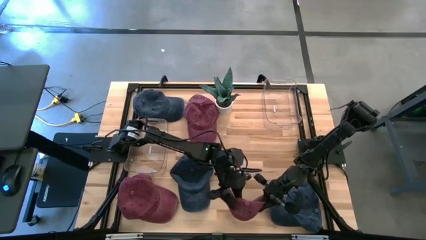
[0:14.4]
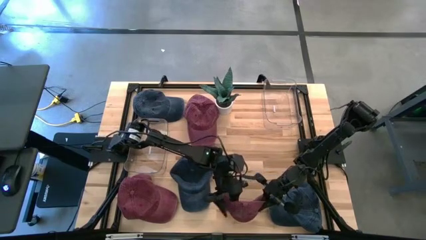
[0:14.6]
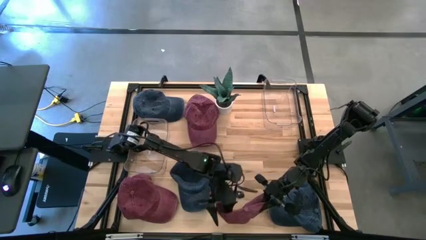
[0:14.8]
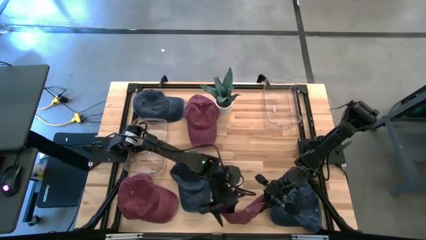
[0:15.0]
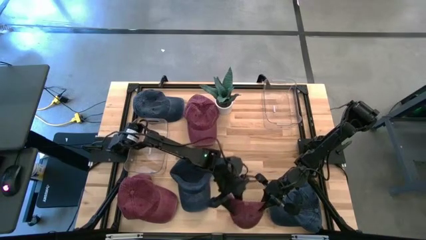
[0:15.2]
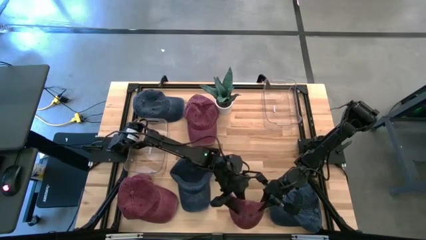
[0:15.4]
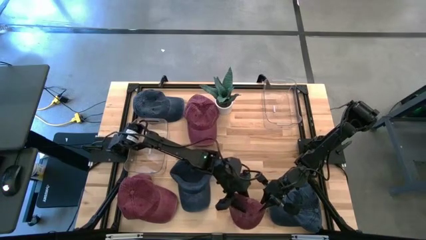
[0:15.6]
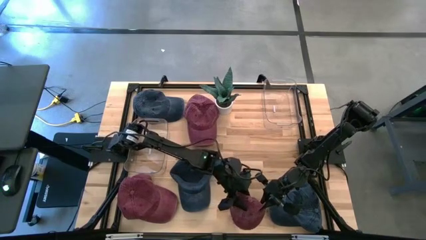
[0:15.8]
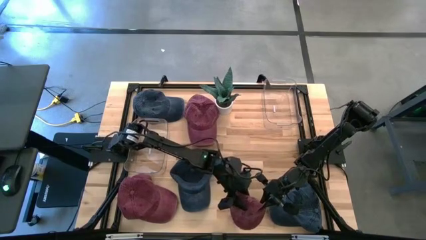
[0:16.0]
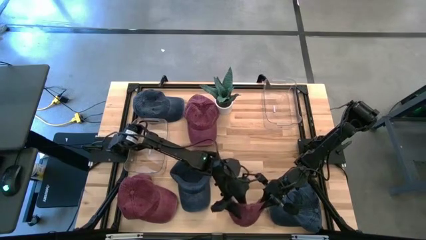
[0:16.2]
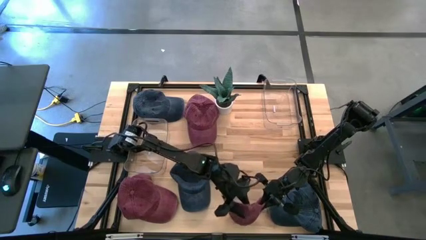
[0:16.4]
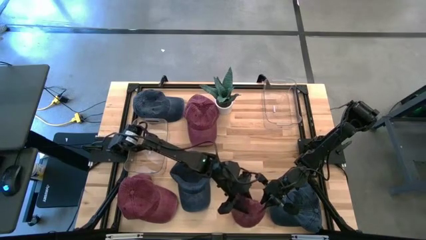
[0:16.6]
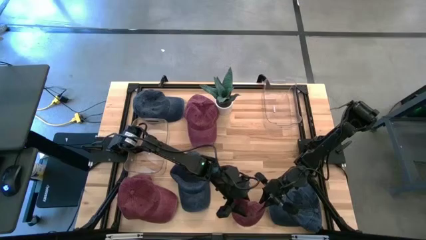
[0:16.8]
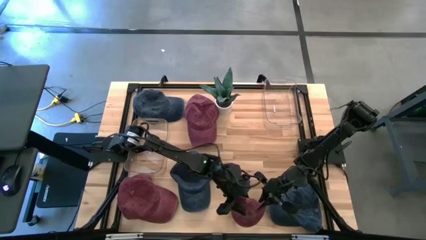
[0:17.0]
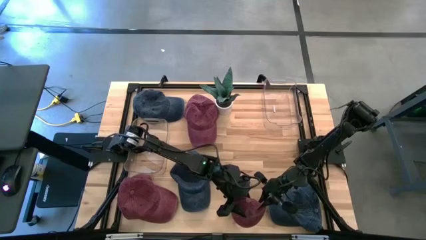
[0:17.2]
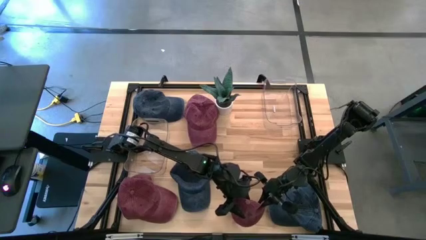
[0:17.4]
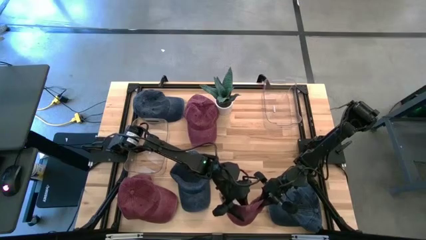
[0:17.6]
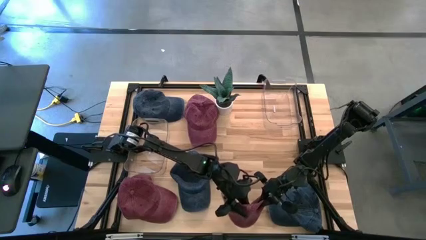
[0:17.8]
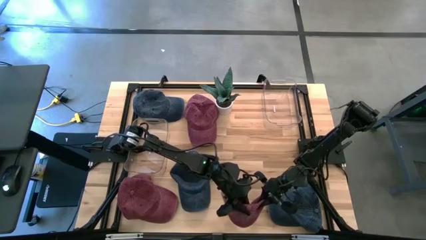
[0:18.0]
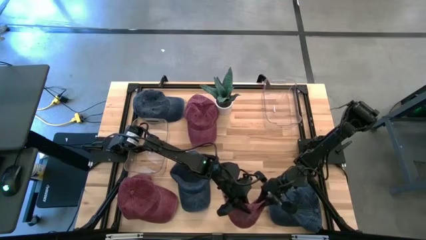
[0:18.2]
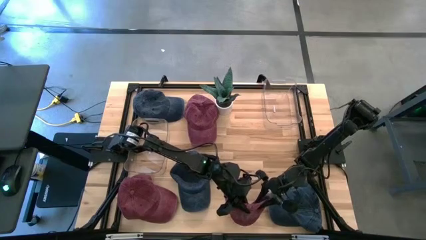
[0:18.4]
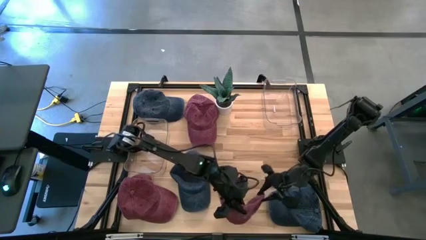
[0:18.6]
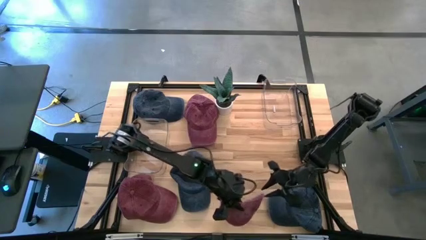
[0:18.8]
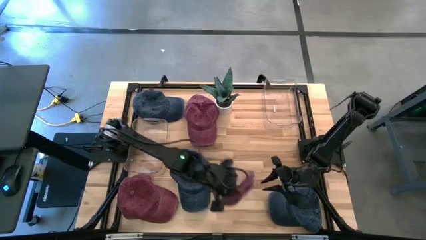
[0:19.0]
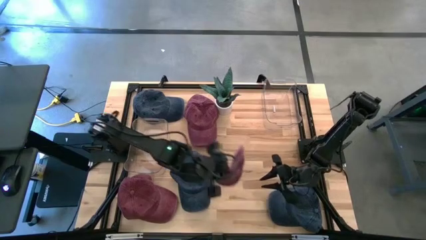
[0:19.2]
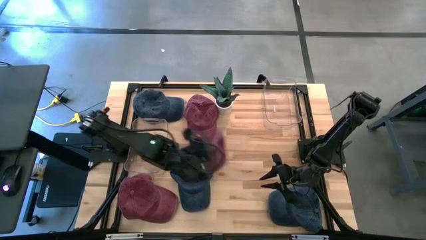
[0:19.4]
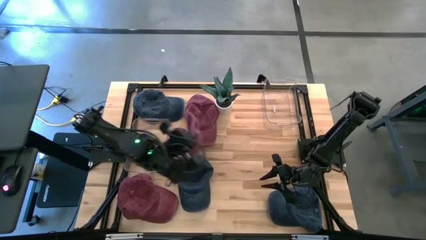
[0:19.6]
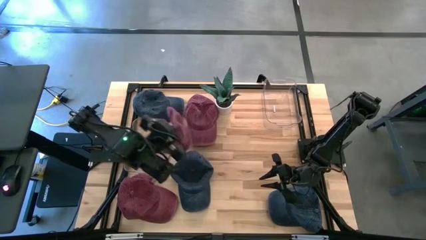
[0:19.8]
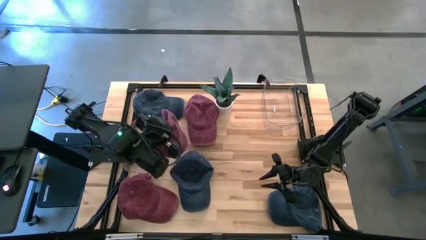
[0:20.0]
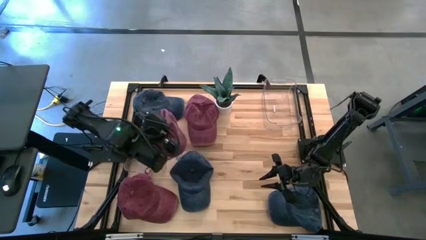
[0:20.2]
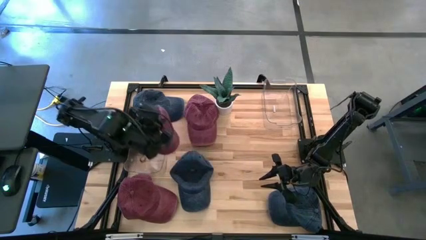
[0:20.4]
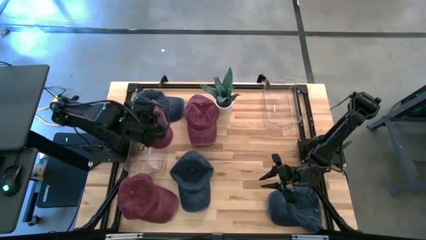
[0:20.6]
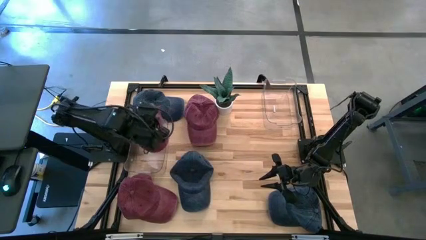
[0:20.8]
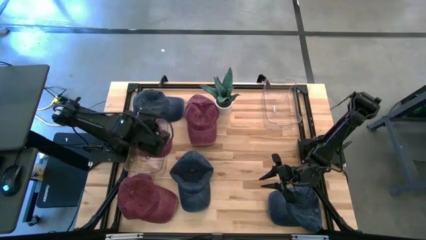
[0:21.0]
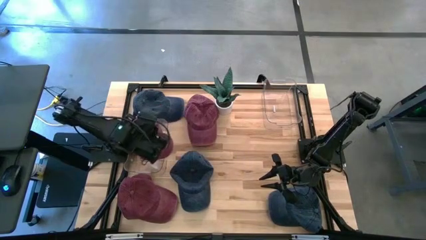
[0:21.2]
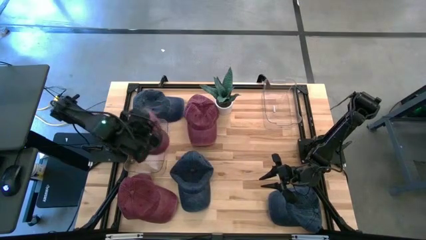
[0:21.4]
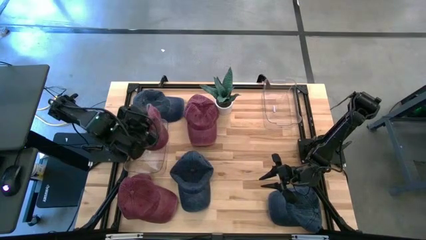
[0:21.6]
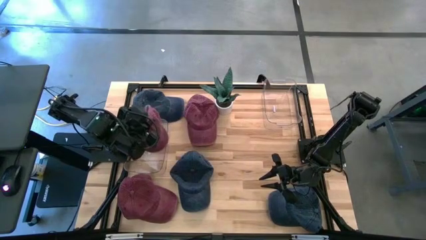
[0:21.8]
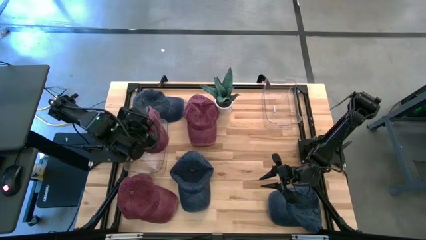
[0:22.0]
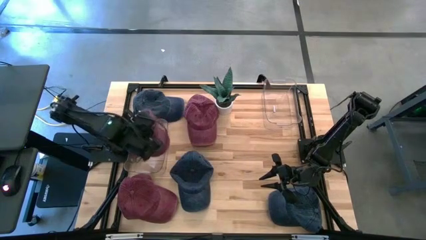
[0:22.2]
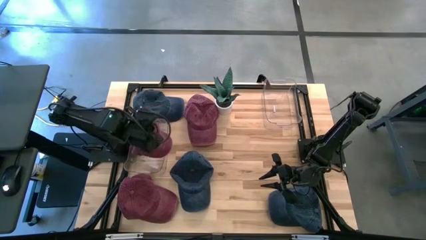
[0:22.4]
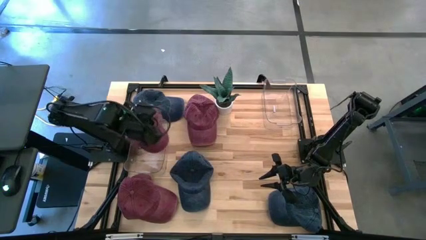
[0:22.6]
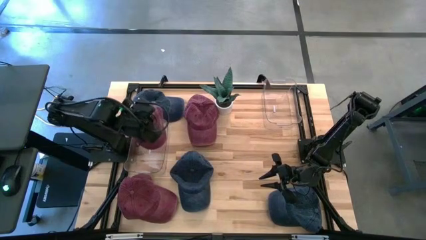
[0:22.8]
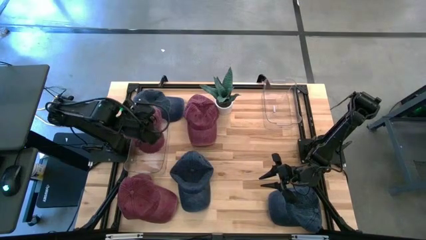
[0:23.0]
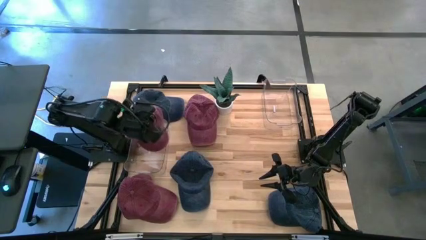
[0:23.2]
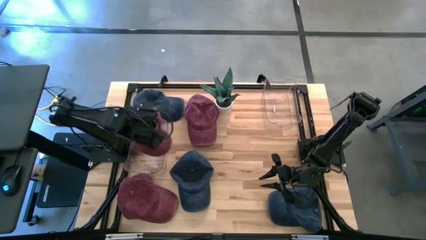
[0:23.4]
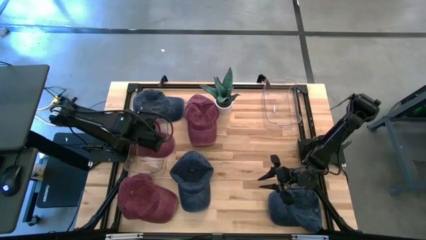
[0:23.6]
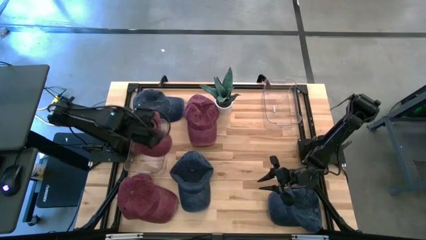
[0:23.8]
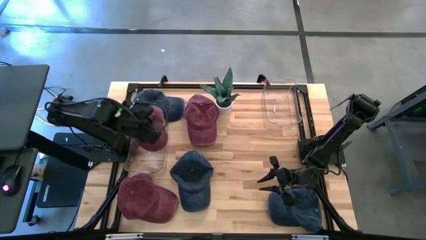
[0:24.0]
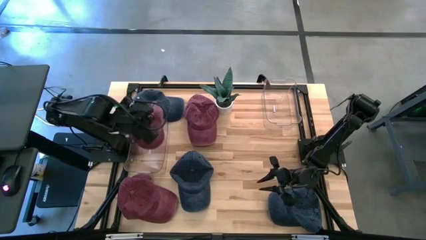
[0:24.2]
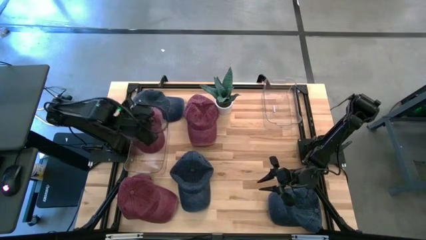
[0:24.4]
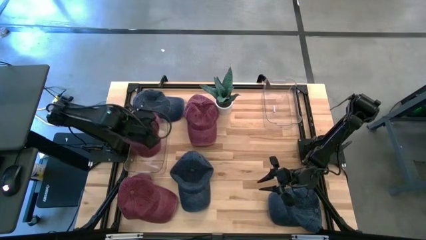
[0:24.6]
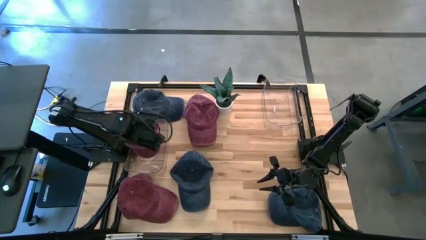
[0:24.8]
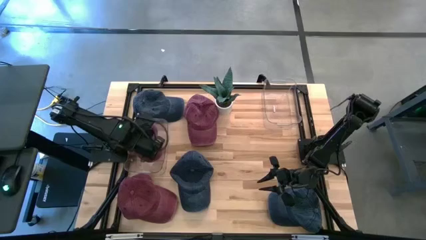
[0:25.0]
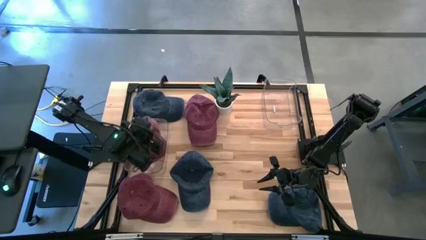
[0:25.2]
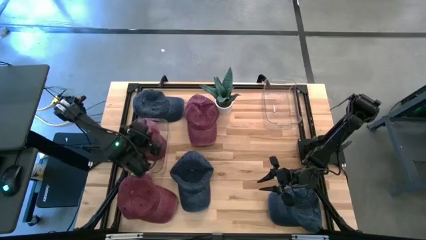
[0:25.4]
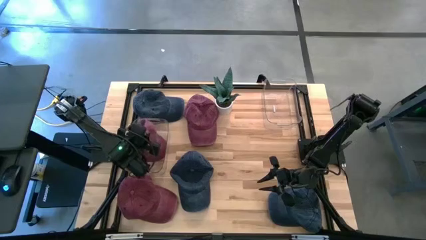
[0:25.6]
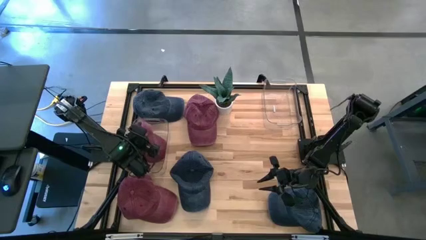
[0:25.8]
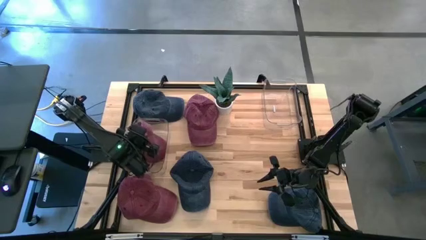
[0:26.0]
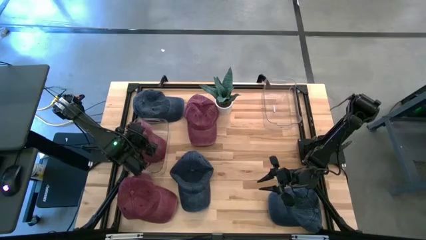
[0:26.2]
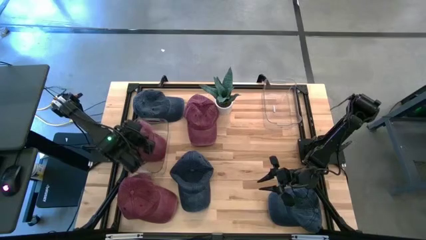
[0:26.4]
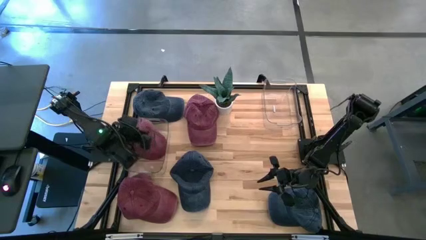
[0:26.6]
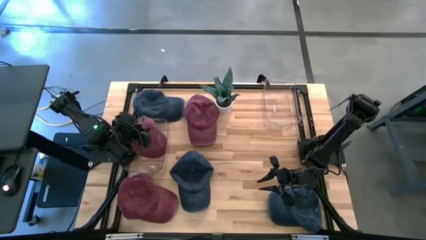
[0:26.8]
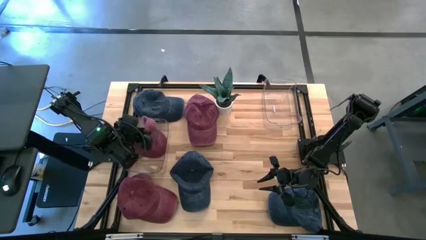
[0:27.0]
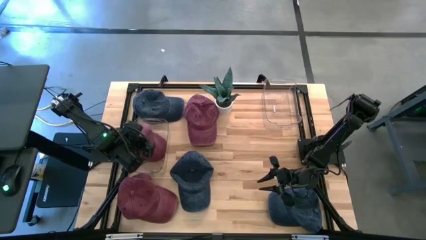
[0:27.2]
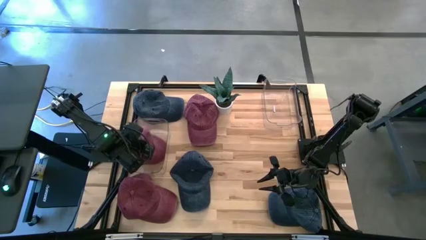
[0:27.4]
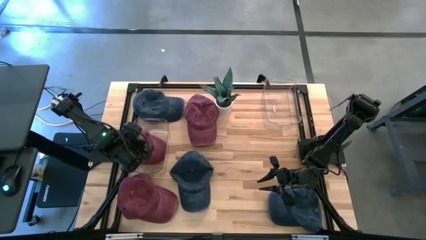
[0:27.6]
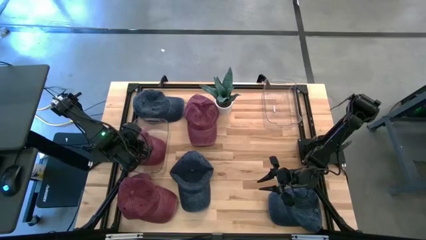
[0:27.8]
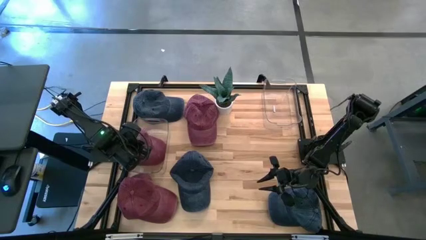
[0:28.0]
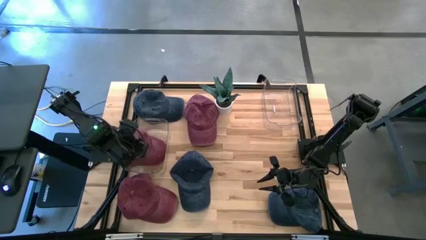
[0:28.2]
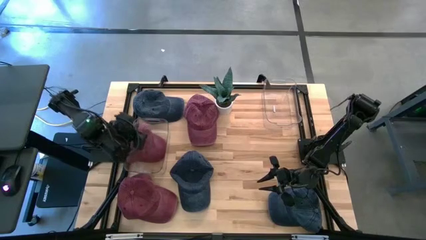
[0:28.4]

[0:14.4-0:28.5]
Task: Pick & Place hat
Put the right red cap into the left transparent bin
